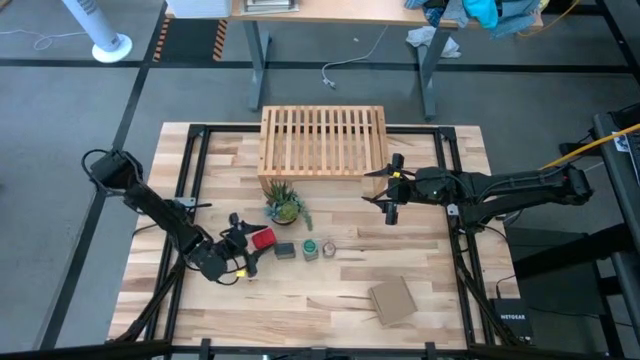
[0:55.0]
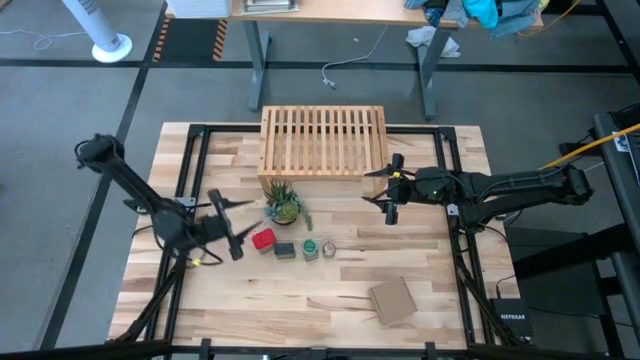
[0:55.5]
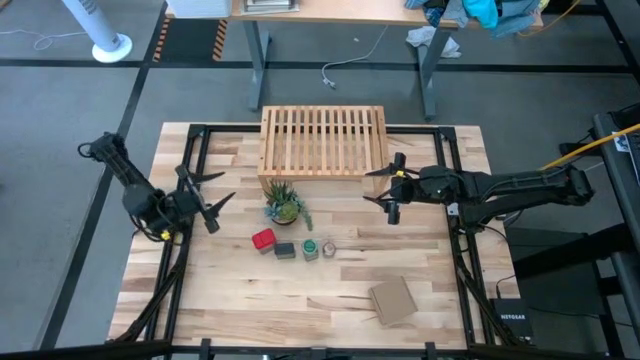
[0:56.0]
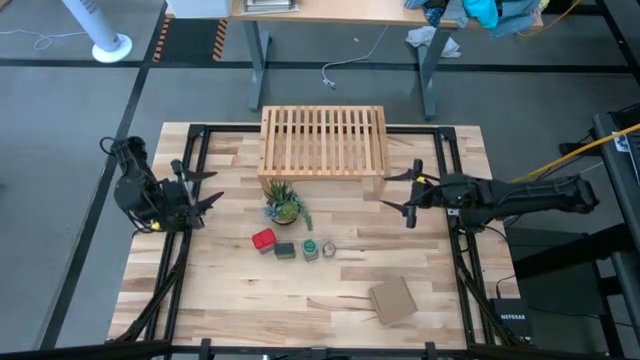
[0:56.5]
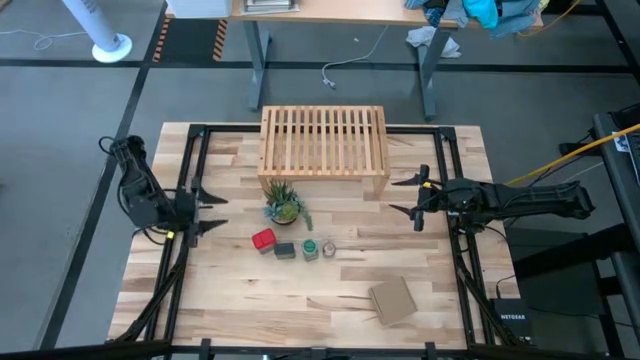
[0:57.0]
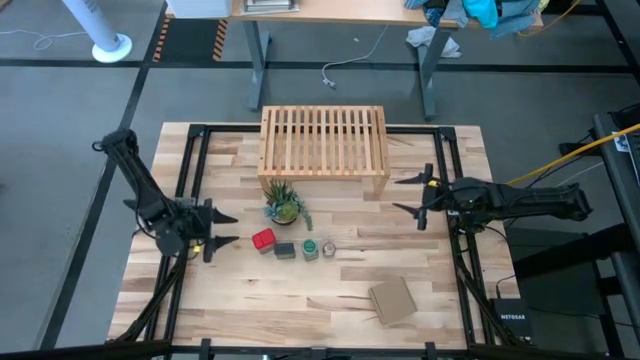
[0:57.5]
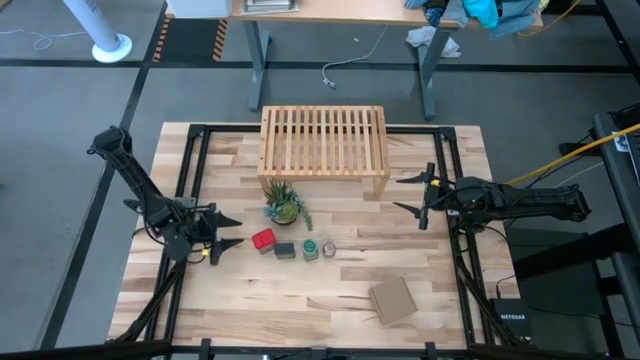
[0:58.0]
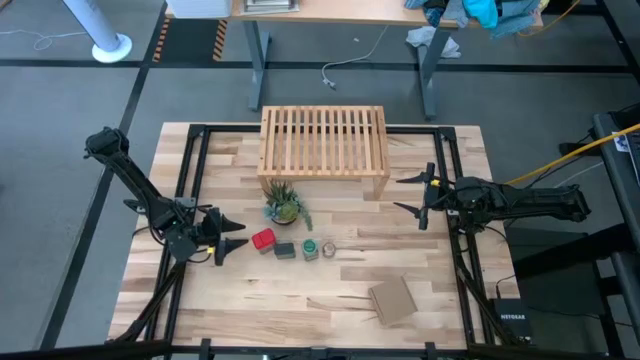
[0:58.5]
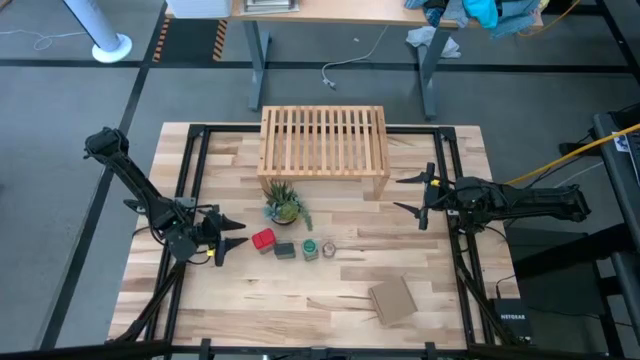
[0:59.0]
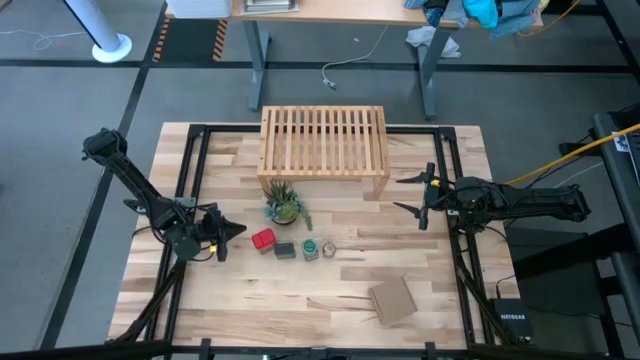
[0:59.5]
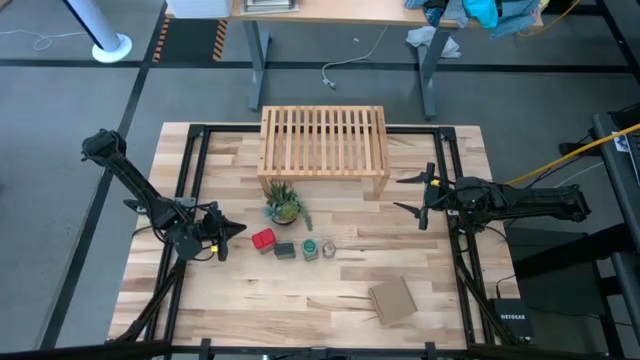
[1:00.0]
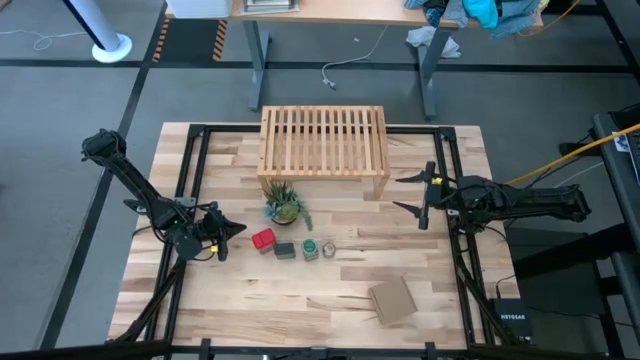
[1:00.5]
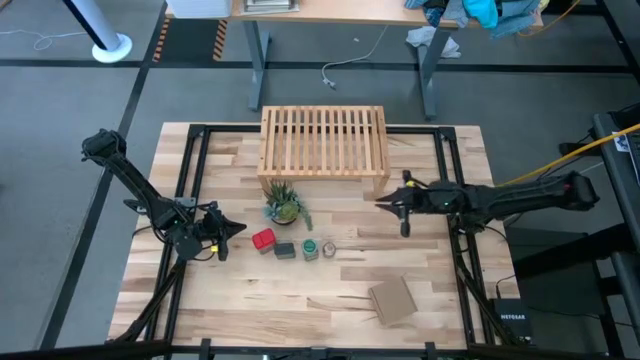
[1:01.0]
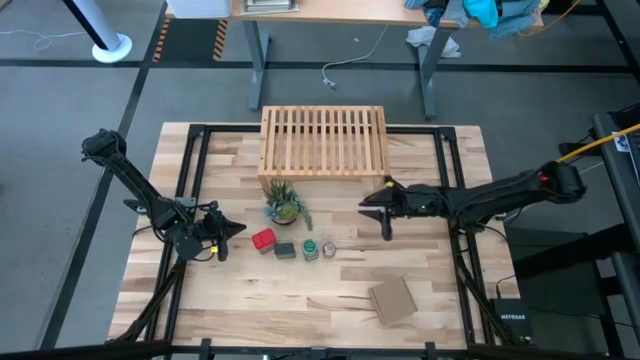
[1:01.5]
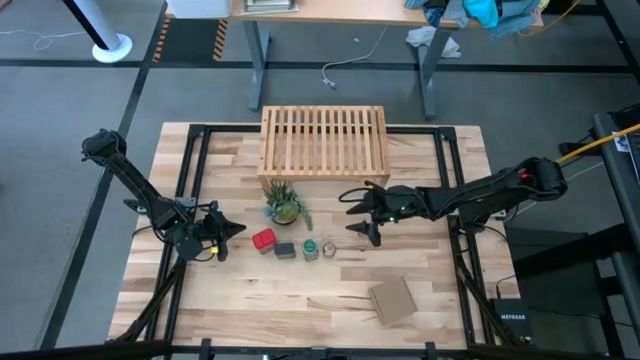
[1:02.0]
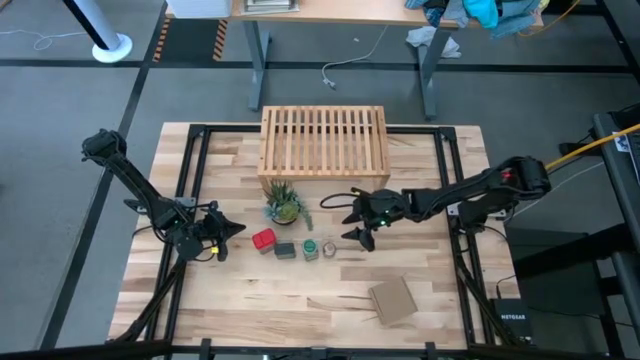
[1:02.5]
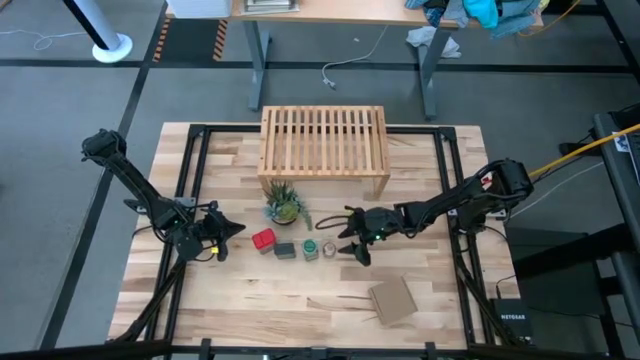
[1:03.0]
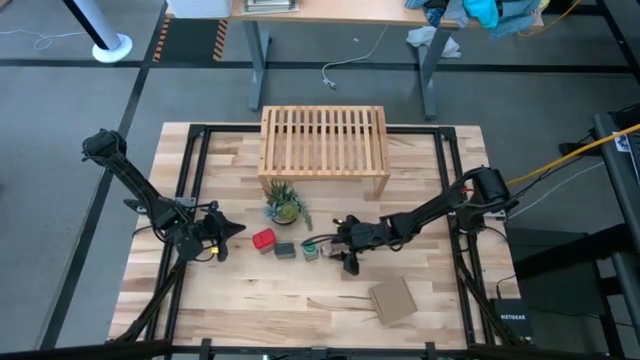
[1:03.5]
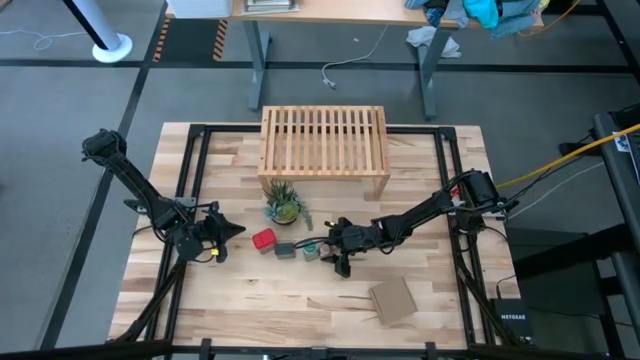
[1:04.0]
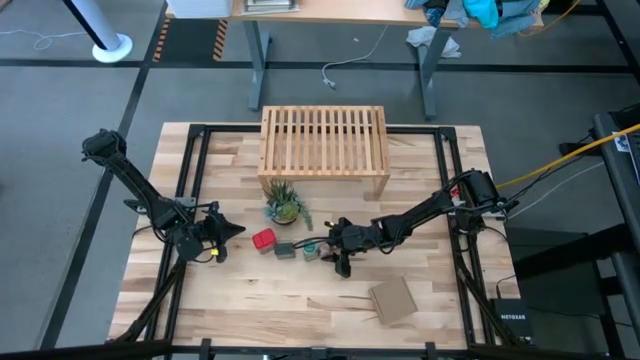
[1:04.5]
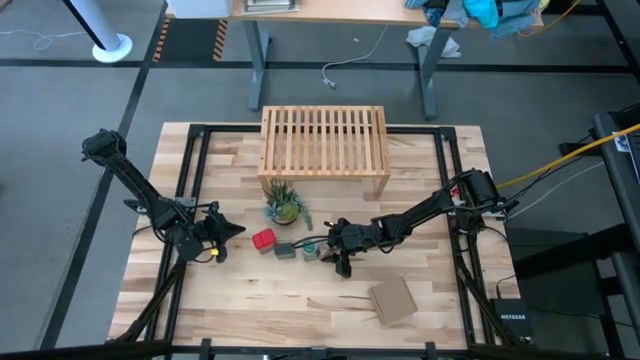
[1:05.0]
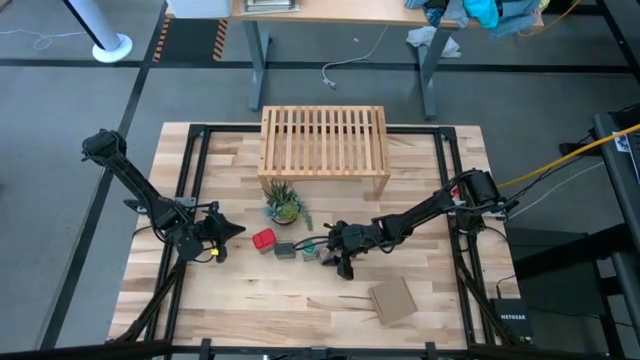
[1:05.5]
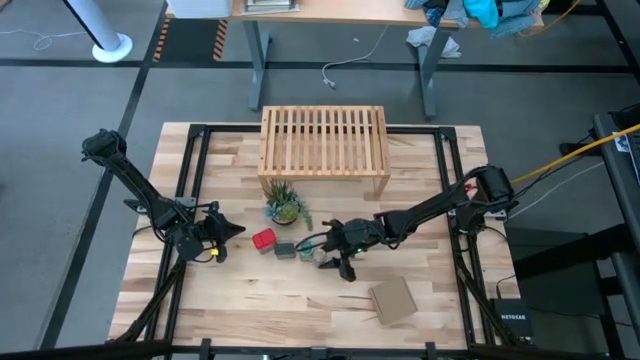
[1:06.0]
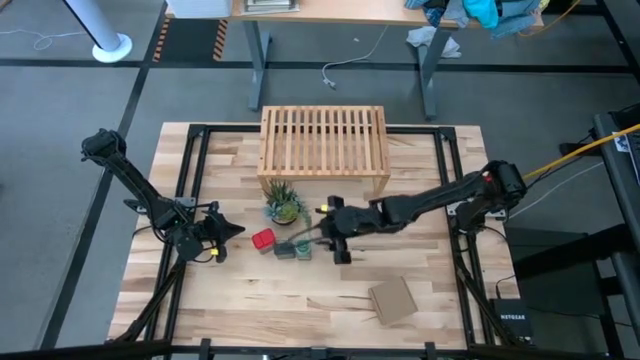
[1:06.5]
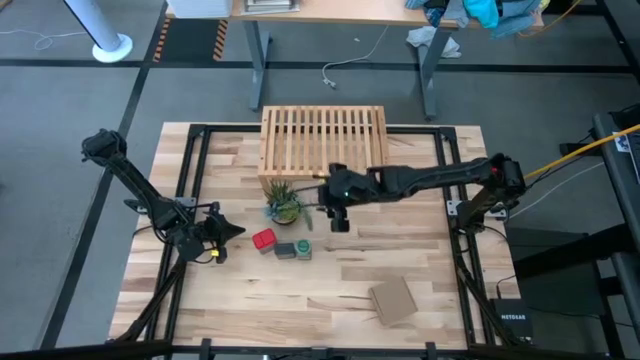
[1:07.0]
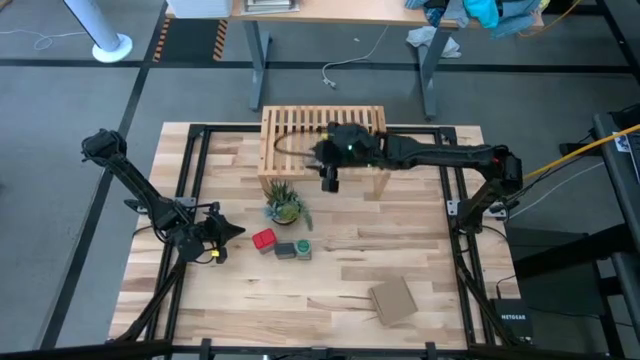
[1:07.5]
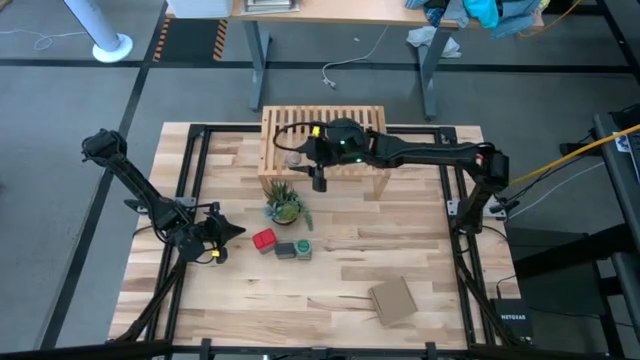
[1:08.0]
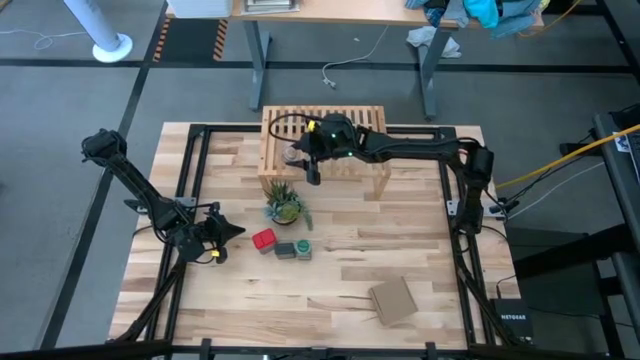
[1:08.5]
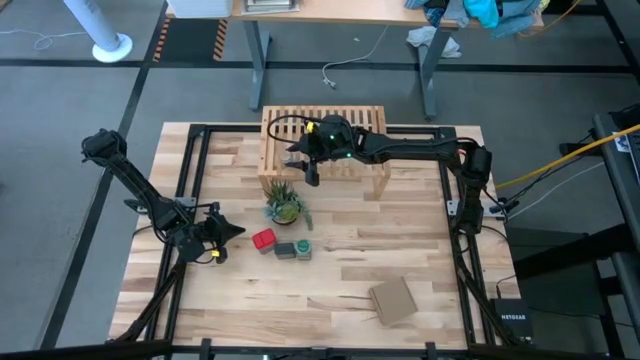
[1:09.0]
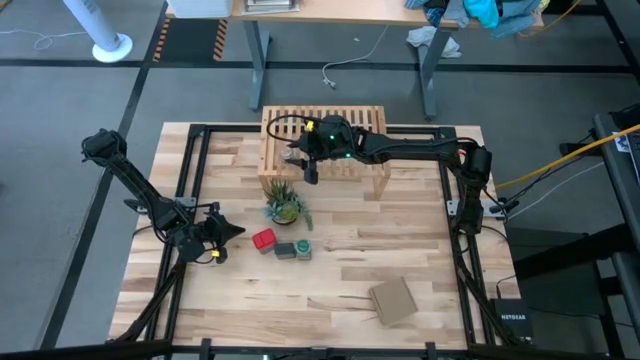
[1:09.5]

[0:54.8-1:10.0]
Task: Shelf spices
Put the brown seasoning bottle on the shelf
